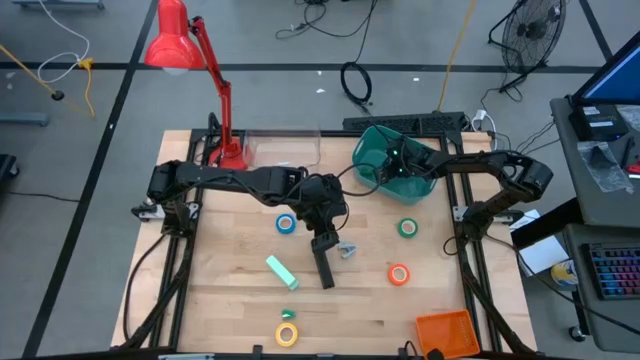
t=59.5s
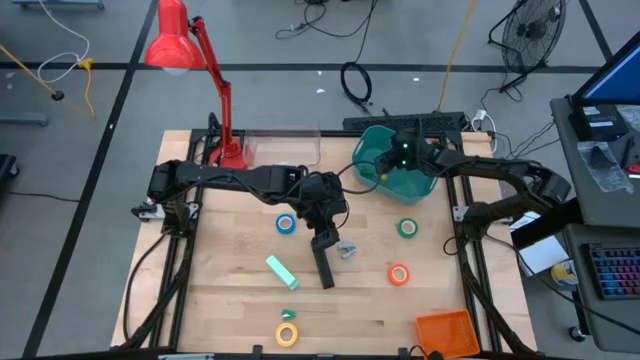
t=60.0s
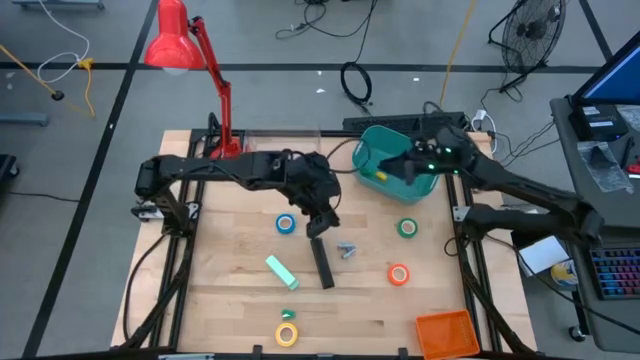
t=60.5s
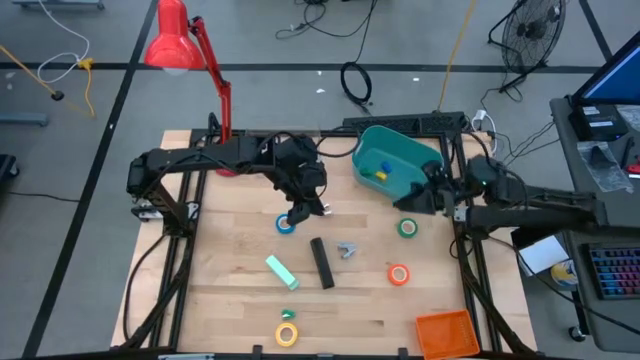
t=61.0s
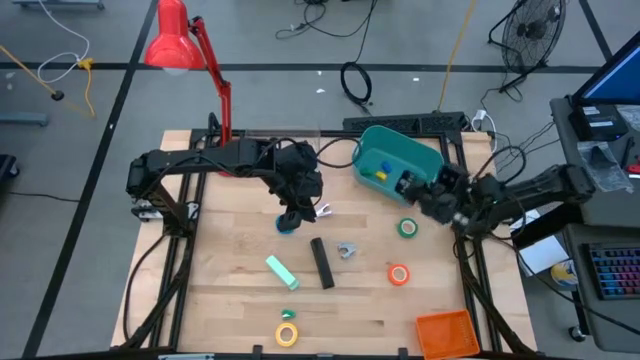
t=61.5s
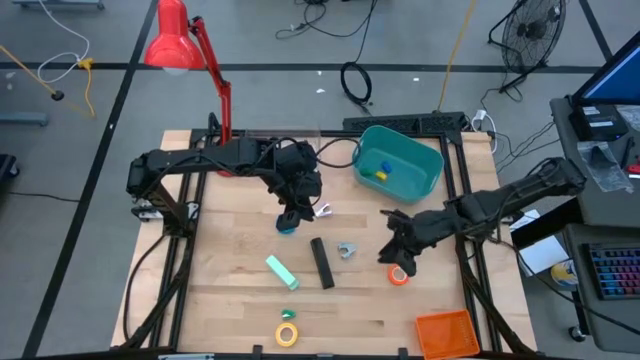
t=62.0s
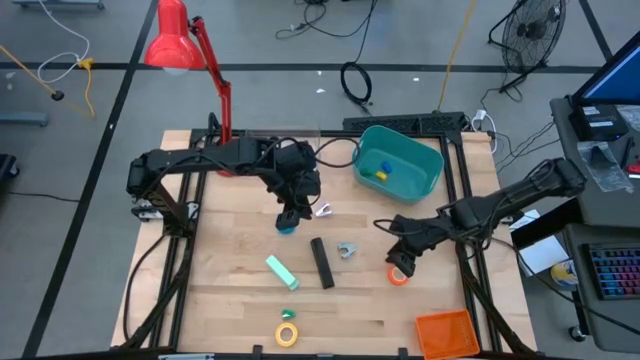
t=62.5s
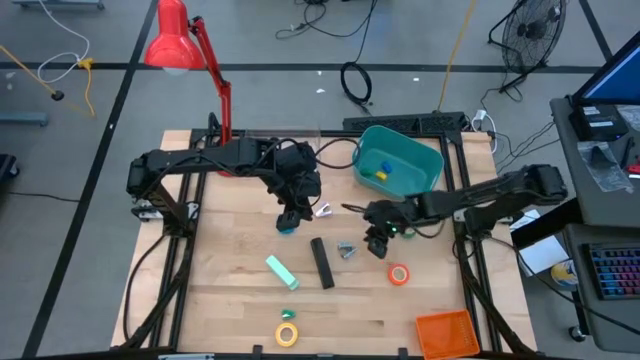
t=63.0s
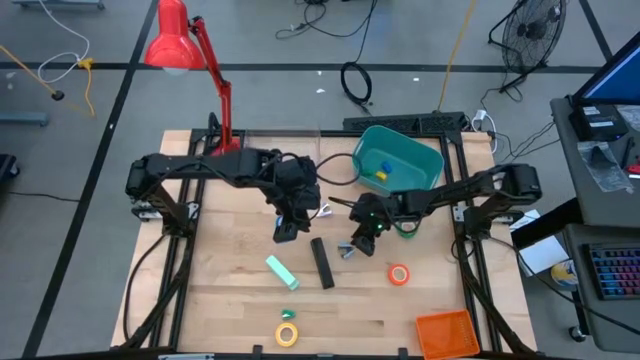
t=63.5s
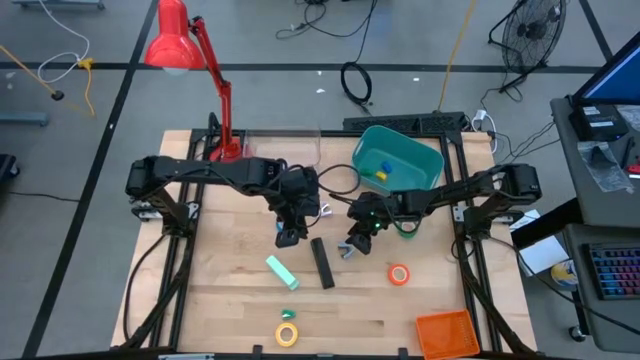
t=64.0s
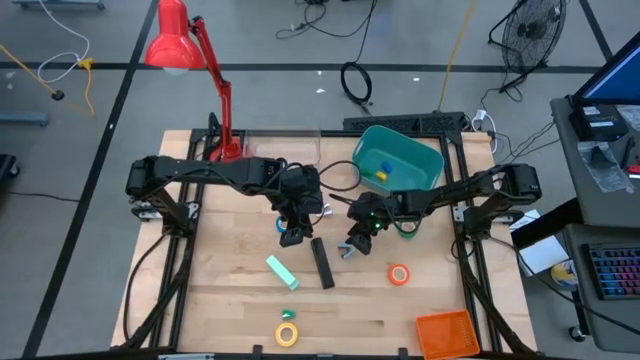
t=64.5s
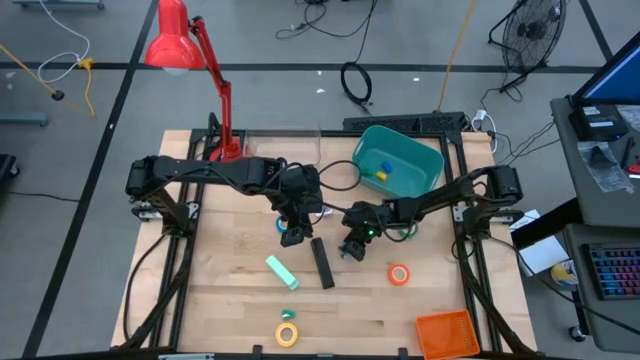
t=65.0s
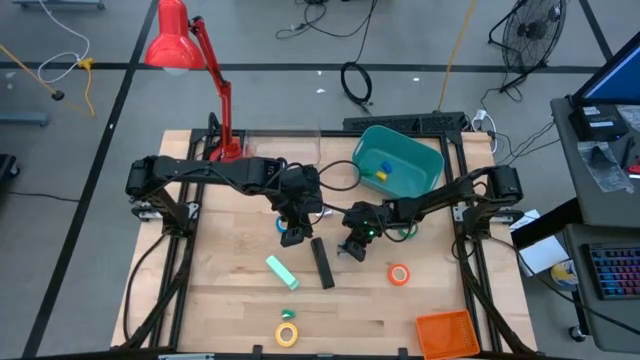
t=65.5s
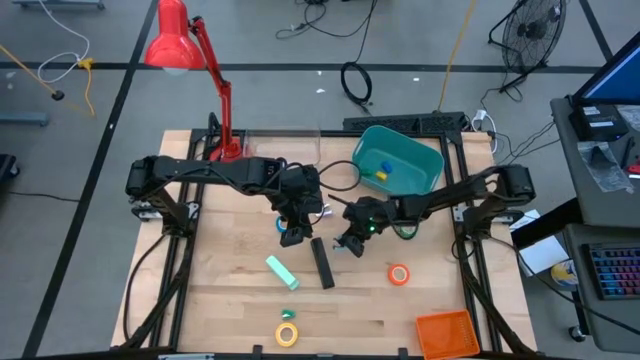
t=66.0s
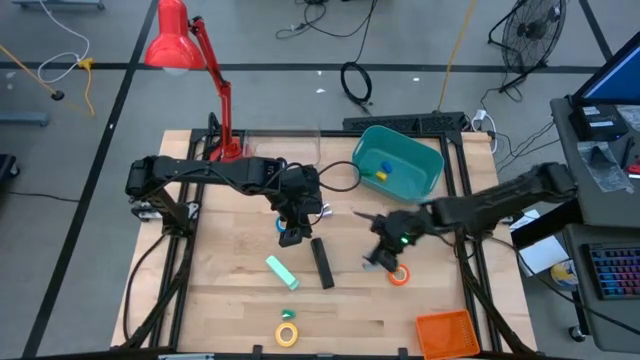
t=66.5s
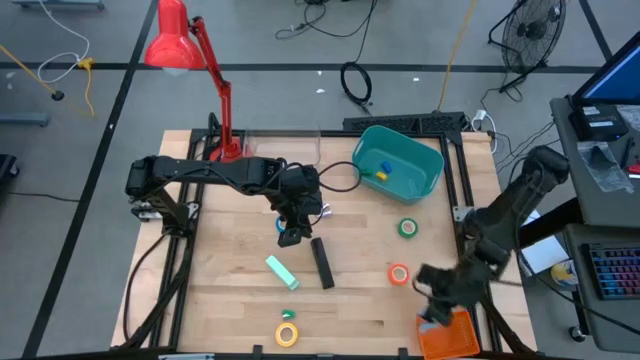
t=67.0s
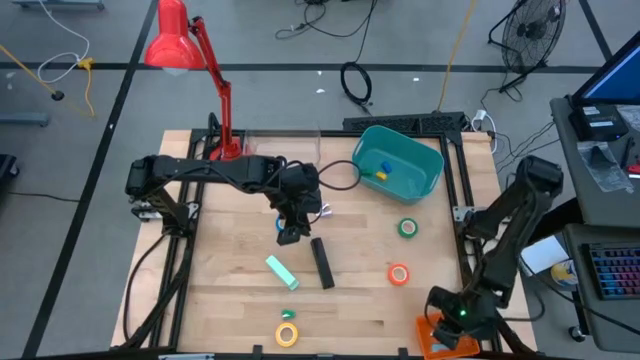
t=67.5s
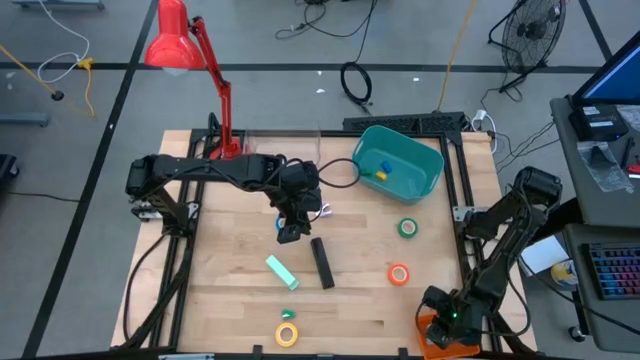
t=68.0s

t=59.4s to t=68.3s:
Task: Pick and place Stapler, Stapler remover, tape
Put the light blue stapler remover into the orange bin

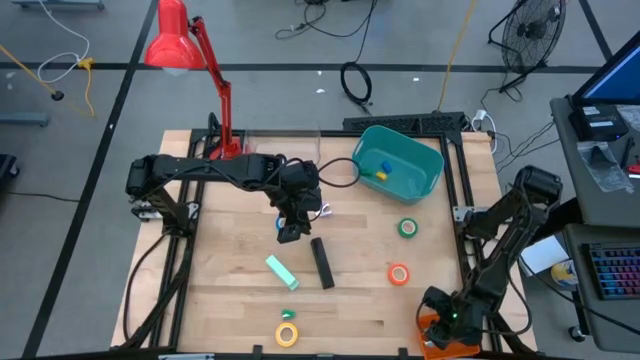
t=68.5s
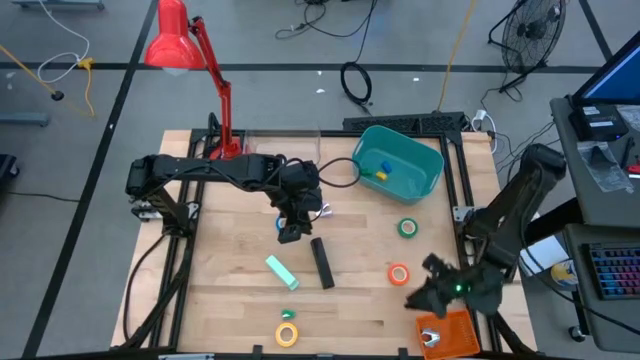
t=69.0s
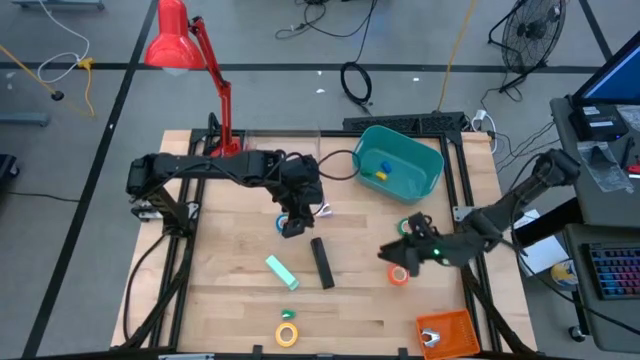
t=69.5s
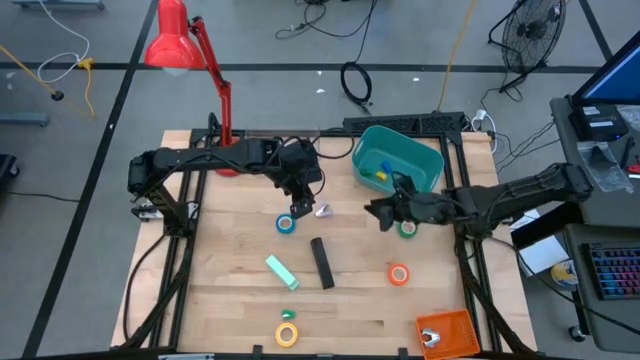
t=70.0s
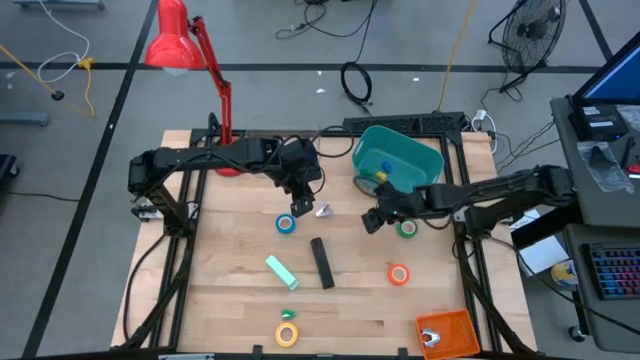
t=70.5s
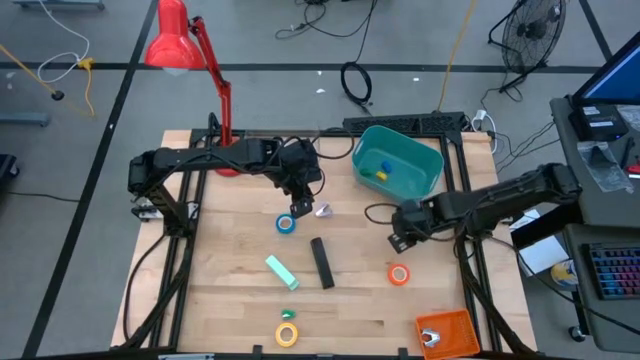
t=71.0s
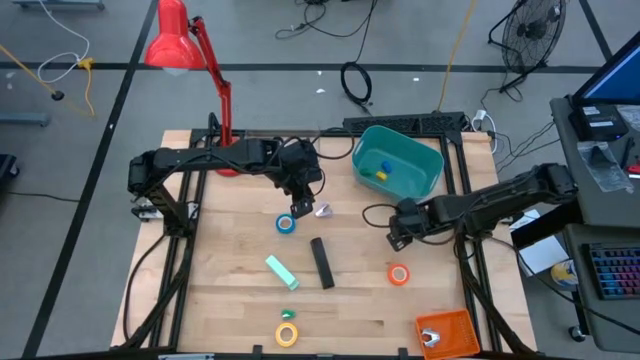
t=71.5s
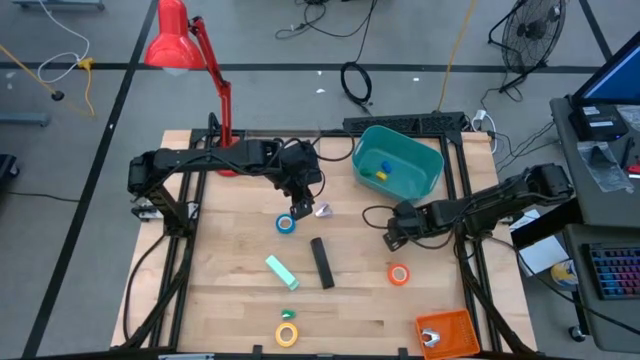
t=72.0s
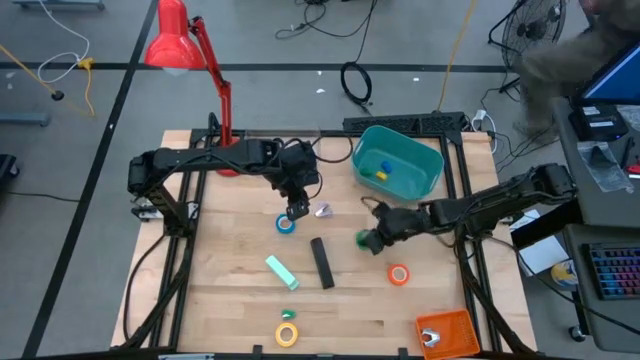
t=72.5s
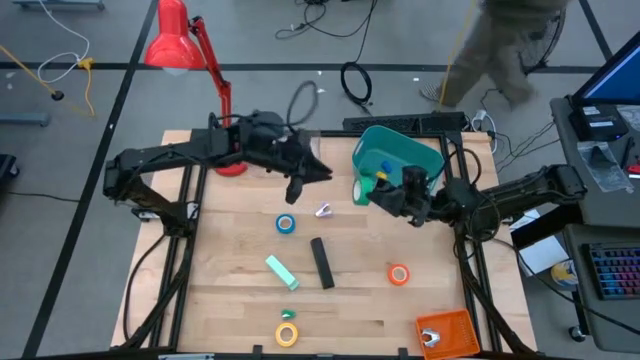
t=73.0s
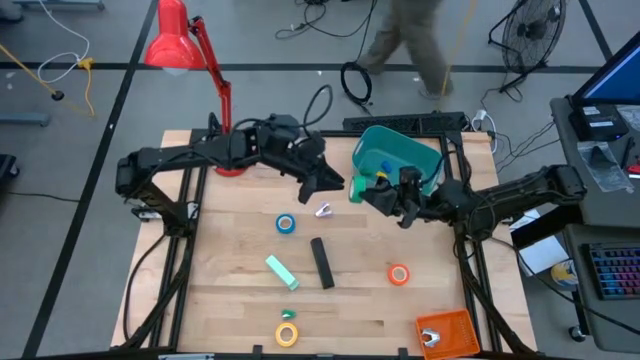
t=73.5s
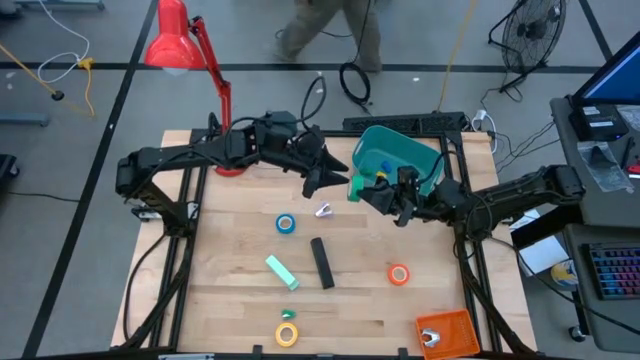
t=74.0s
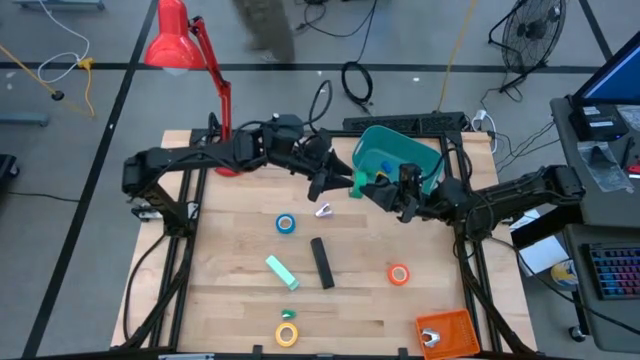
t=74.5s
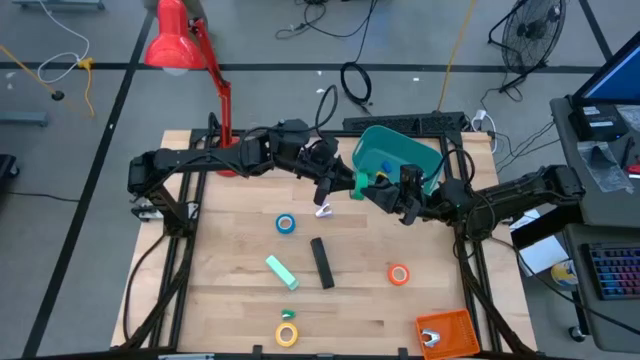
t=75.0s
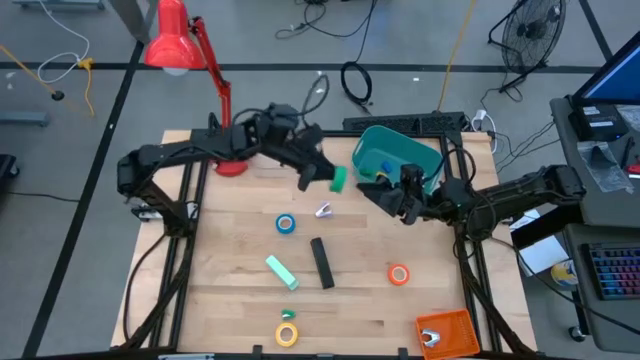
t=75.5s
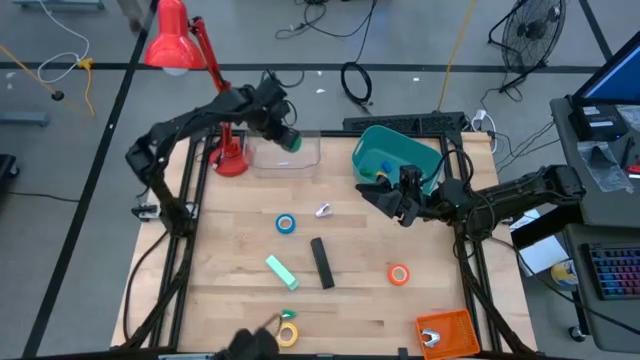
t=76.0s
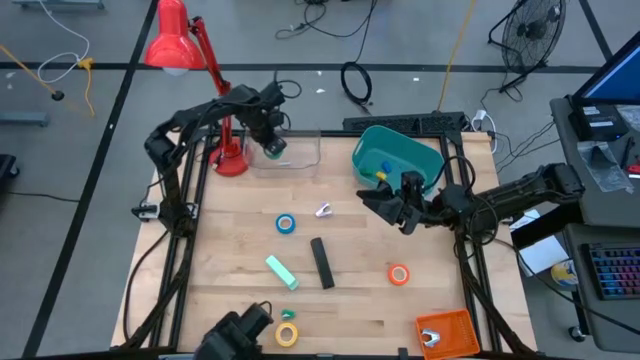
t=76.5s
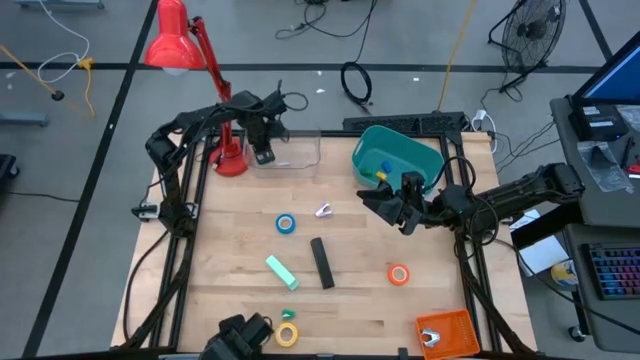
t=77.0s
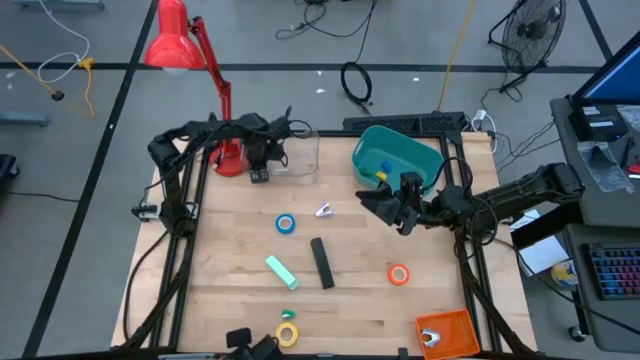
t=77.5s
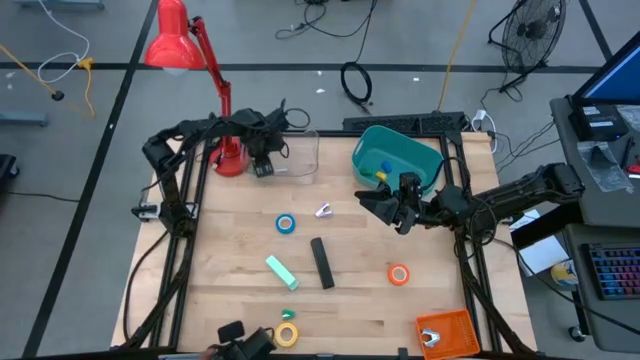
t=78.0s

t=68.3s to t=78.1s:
Put the green tape into the transparent bin

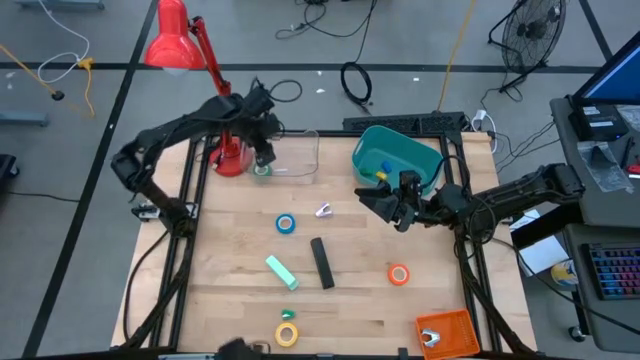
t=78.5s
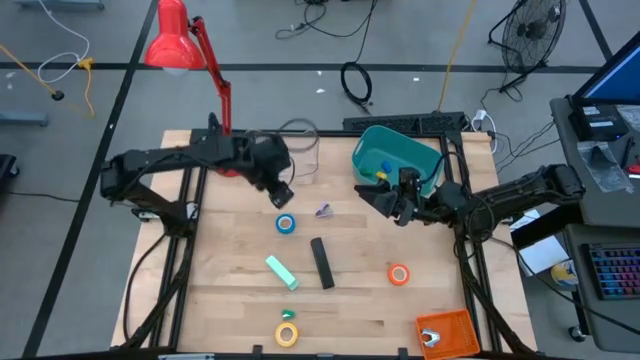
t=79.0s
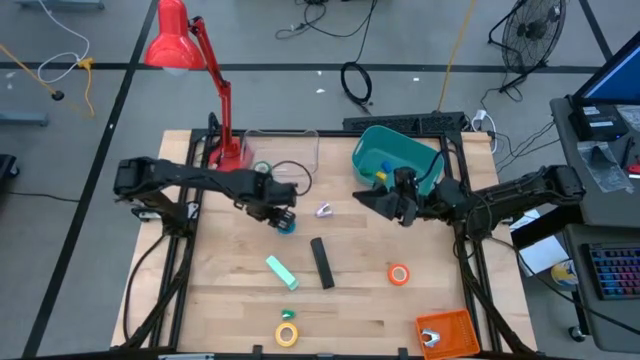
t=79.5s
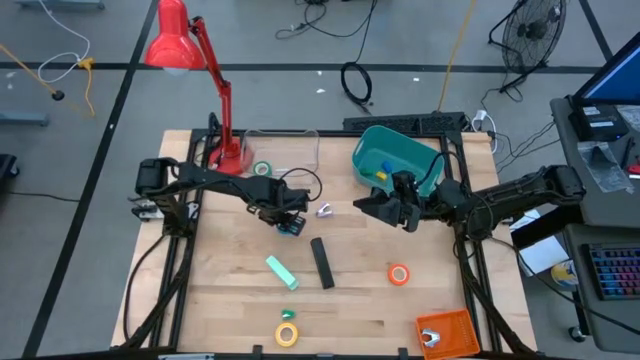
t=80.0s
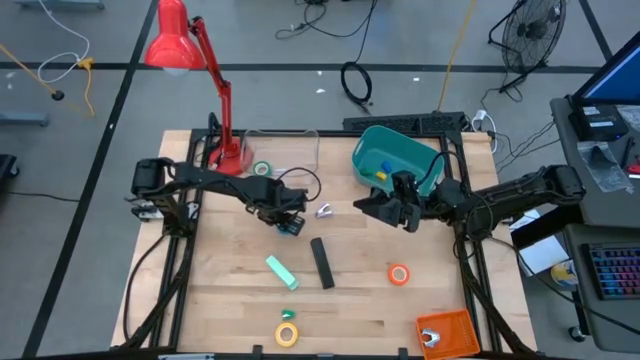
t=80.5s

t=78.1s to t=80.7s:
Put the blue tape into the transparent bin

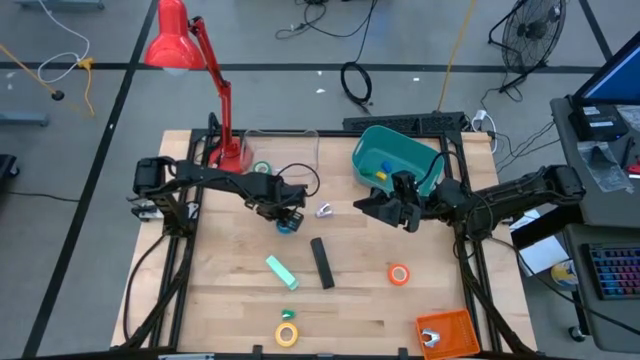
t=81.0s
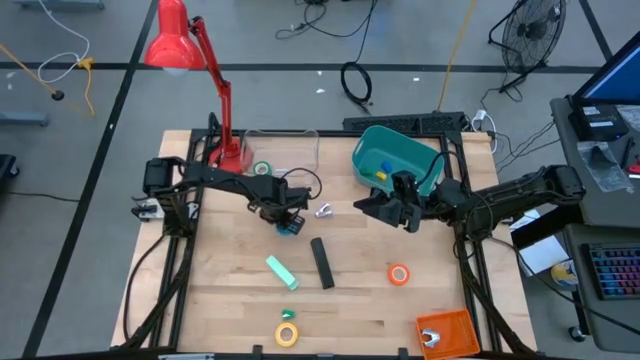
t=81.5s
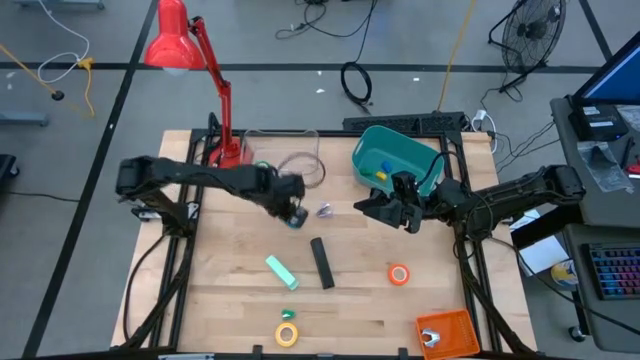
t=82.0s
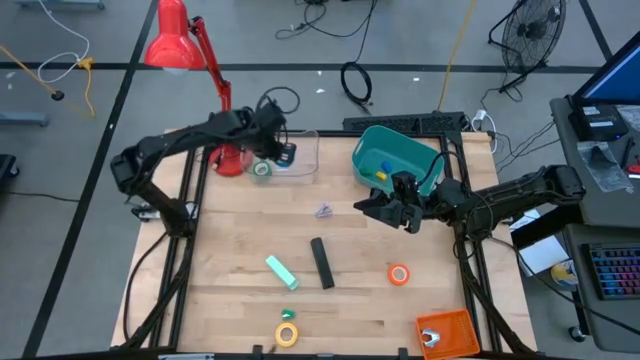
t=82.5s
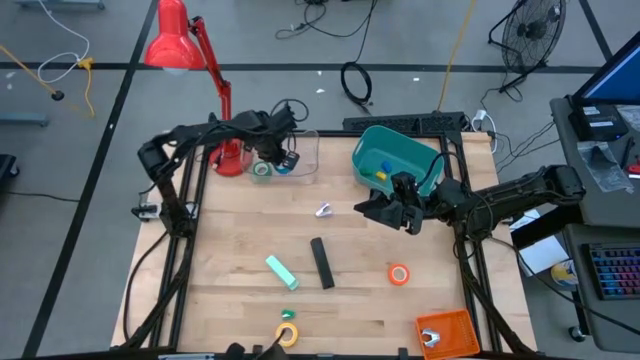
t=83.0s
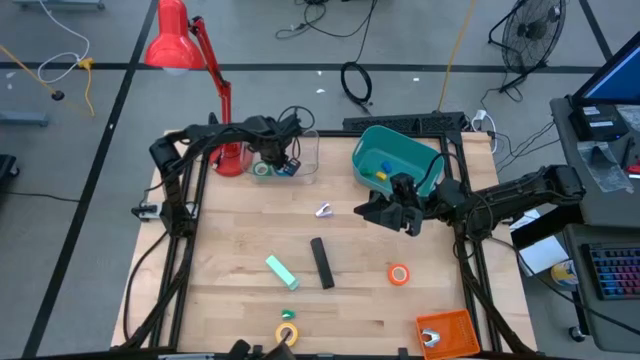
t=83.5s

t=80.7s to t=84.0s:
Put the blue tape into the transparent bin
